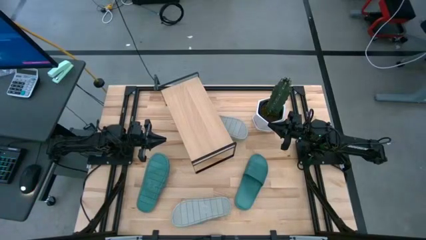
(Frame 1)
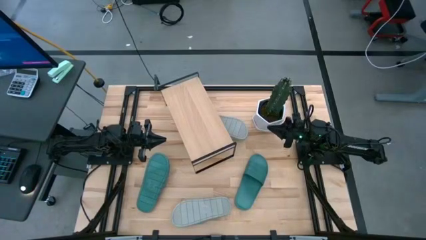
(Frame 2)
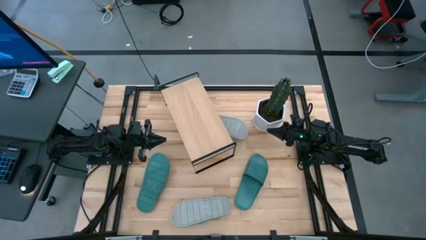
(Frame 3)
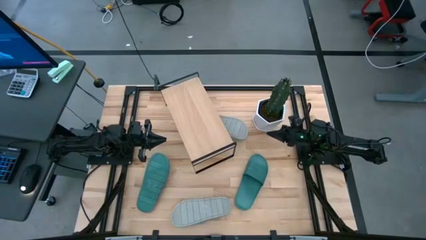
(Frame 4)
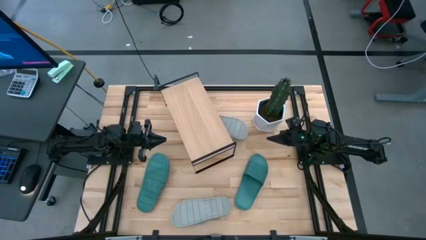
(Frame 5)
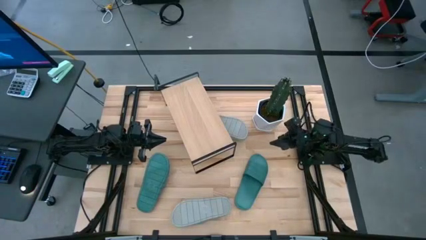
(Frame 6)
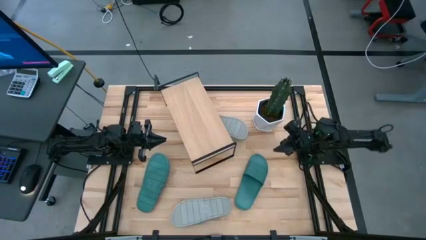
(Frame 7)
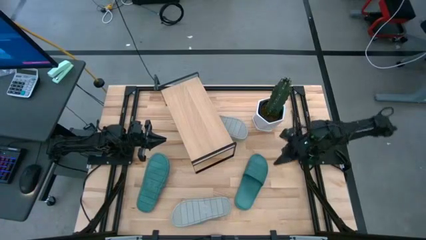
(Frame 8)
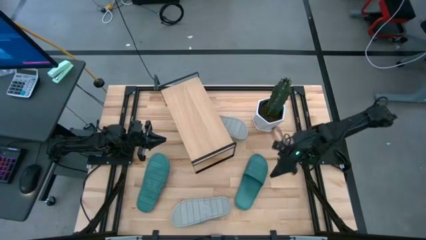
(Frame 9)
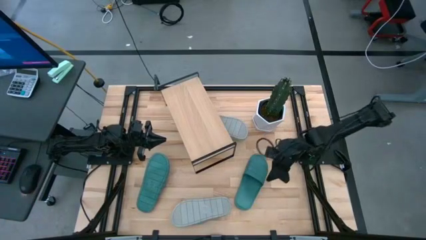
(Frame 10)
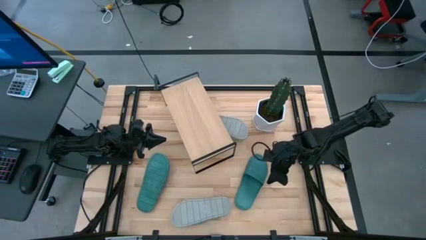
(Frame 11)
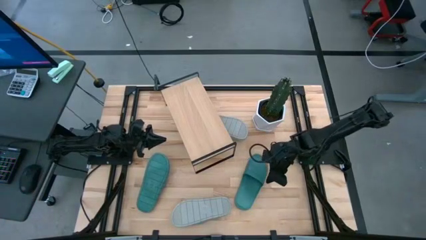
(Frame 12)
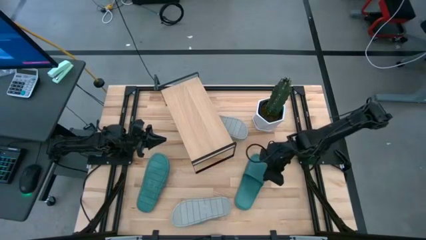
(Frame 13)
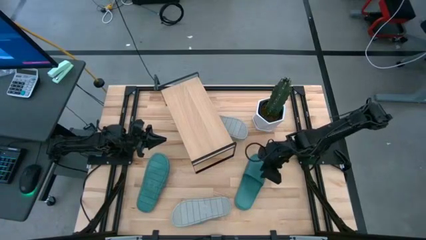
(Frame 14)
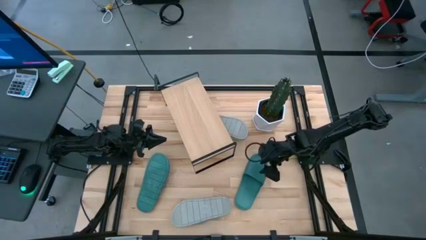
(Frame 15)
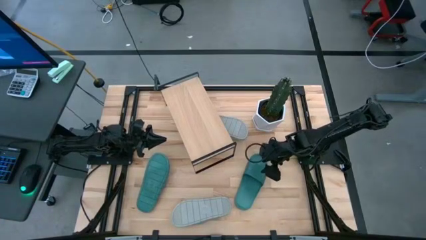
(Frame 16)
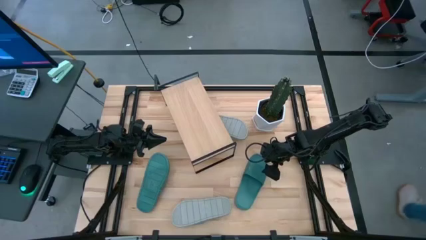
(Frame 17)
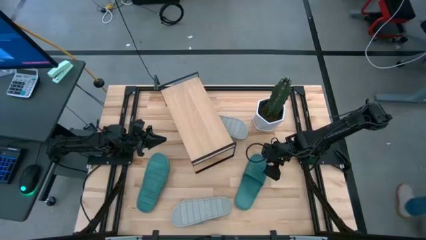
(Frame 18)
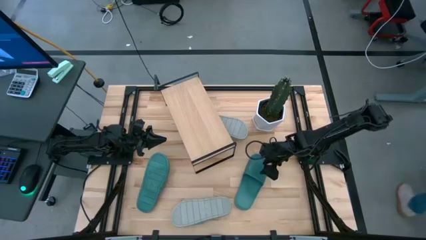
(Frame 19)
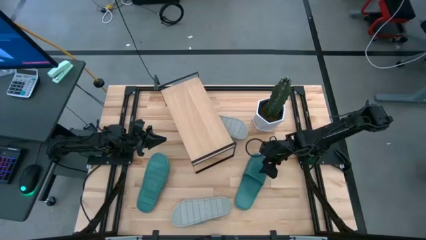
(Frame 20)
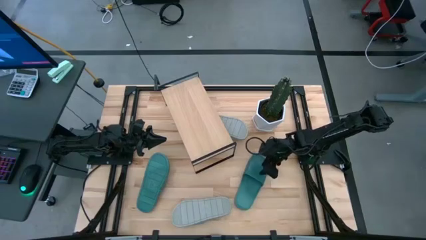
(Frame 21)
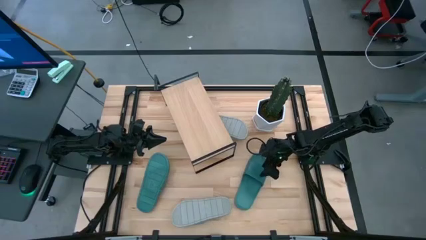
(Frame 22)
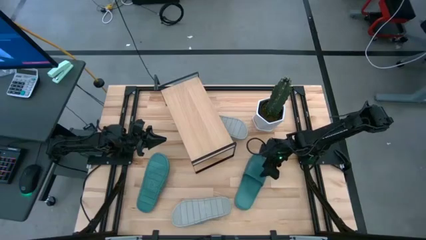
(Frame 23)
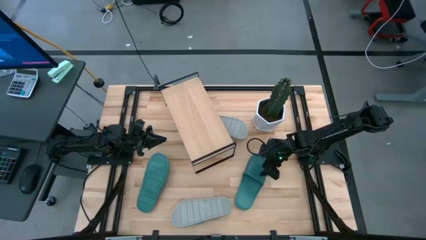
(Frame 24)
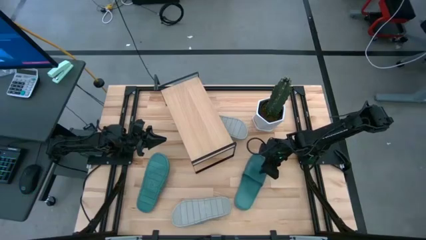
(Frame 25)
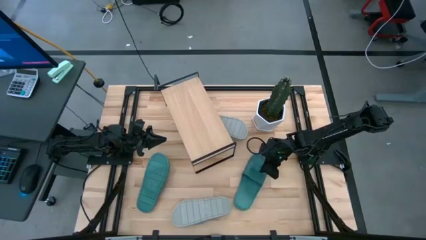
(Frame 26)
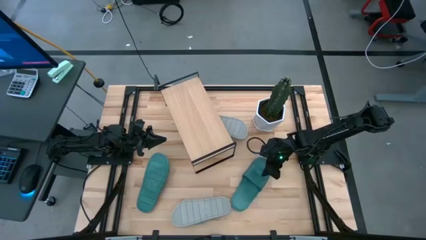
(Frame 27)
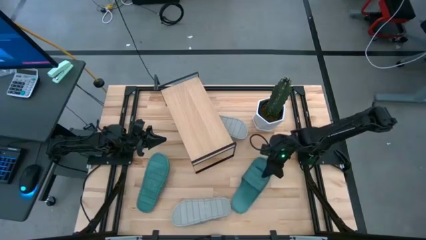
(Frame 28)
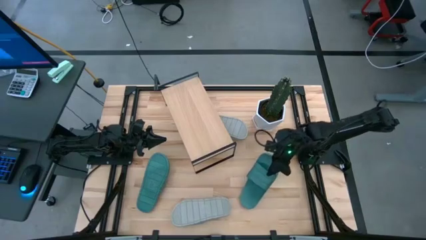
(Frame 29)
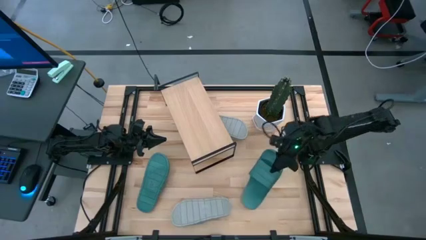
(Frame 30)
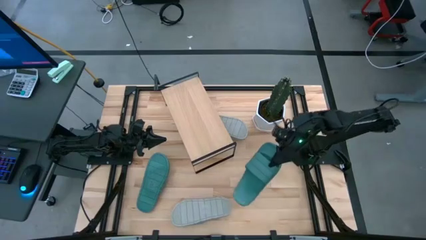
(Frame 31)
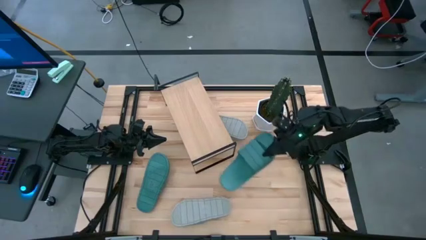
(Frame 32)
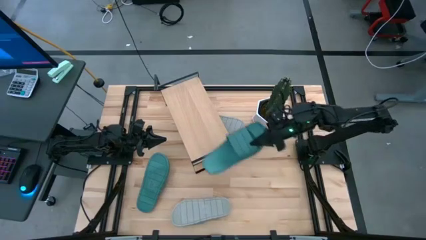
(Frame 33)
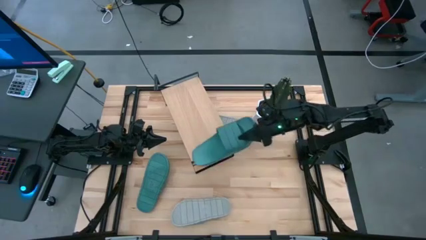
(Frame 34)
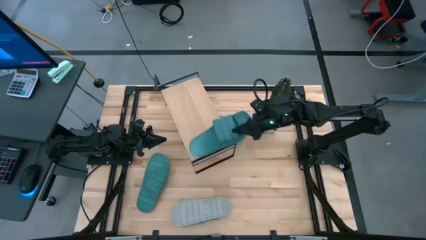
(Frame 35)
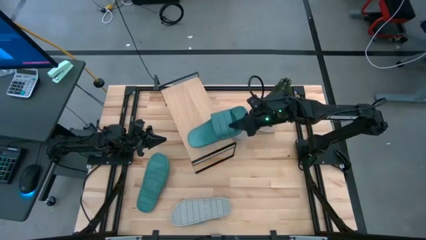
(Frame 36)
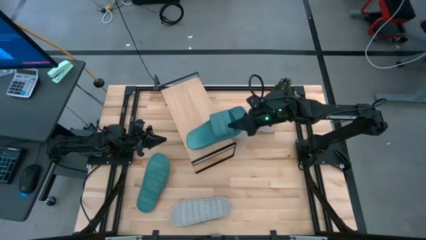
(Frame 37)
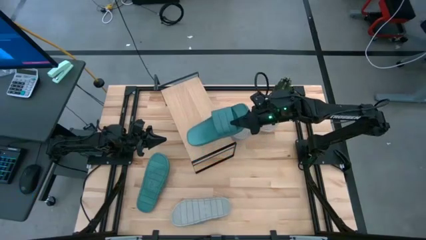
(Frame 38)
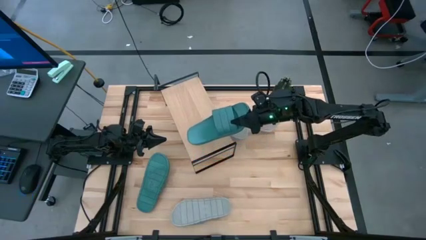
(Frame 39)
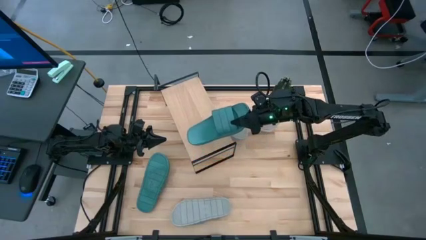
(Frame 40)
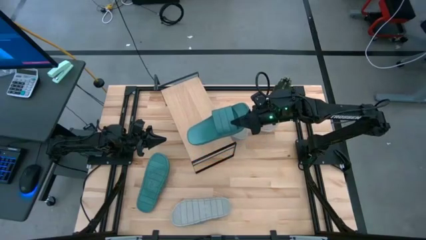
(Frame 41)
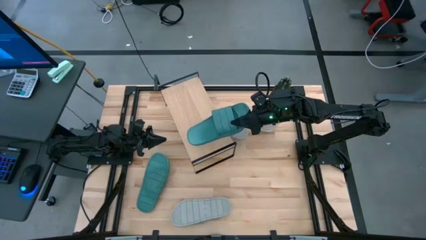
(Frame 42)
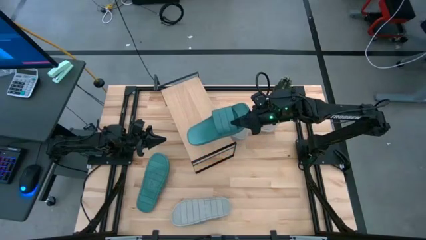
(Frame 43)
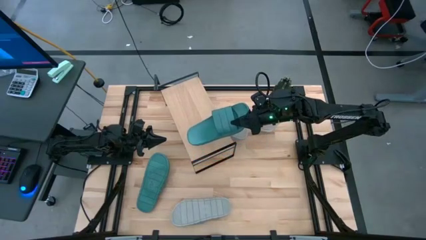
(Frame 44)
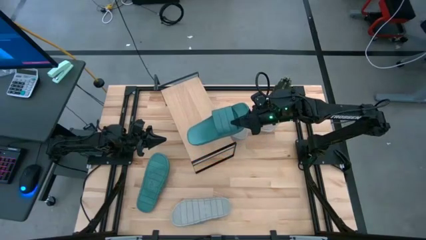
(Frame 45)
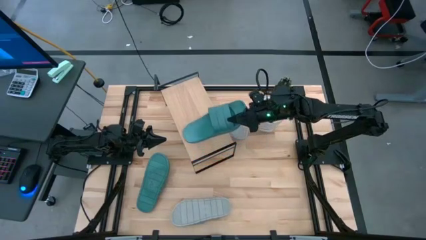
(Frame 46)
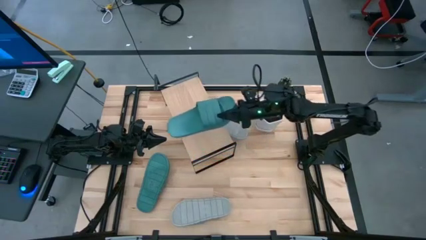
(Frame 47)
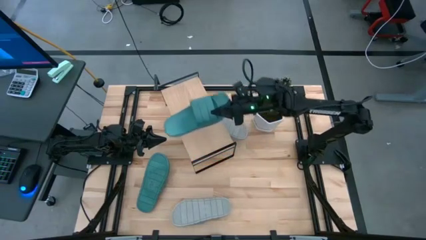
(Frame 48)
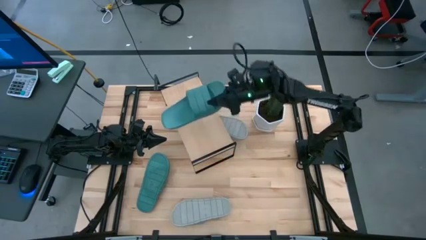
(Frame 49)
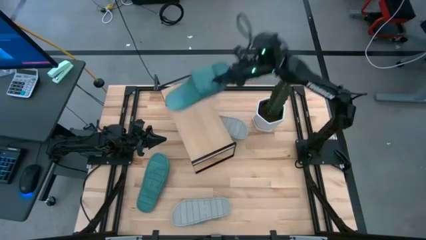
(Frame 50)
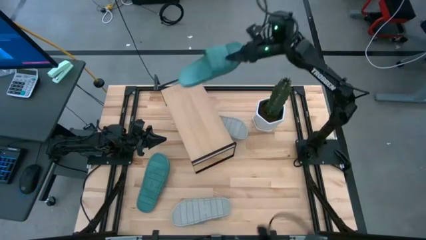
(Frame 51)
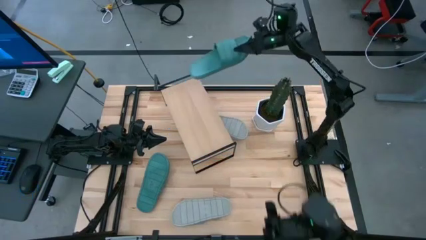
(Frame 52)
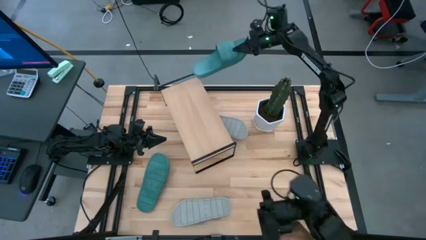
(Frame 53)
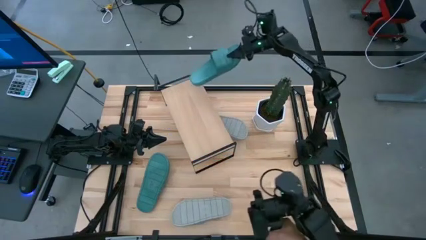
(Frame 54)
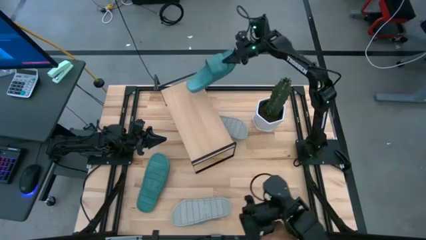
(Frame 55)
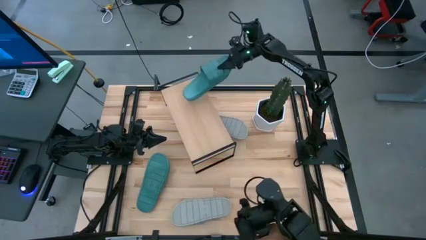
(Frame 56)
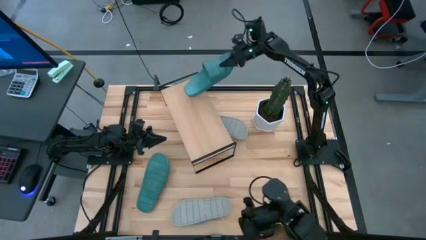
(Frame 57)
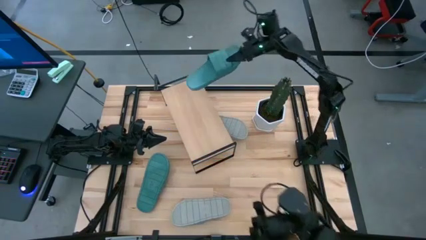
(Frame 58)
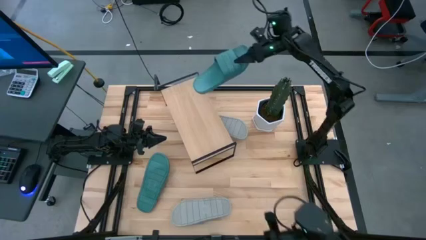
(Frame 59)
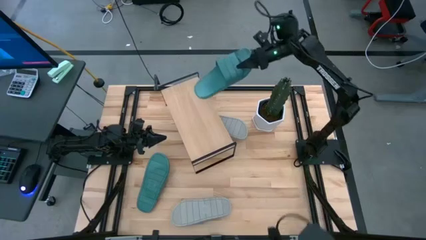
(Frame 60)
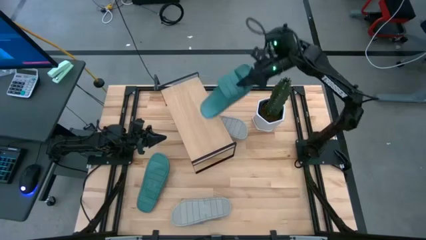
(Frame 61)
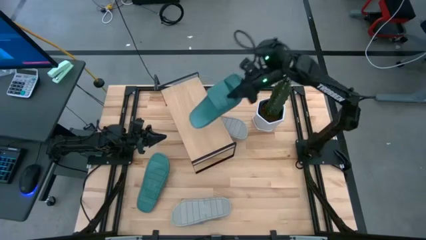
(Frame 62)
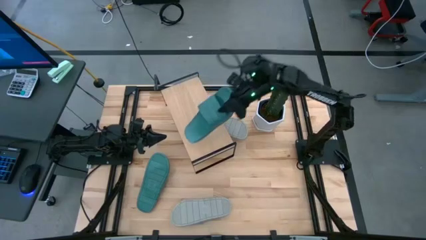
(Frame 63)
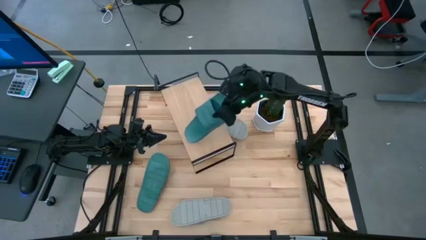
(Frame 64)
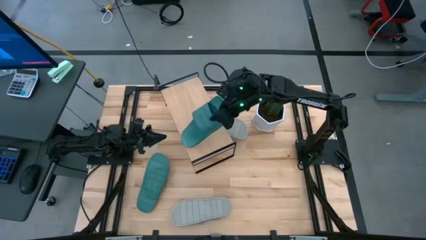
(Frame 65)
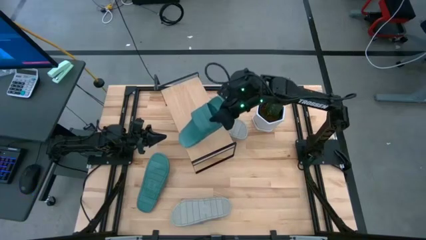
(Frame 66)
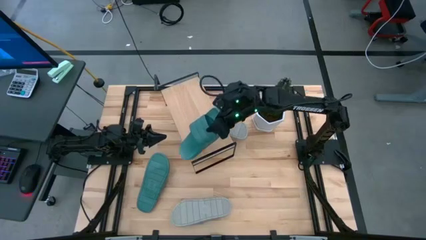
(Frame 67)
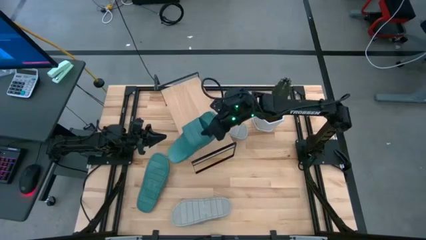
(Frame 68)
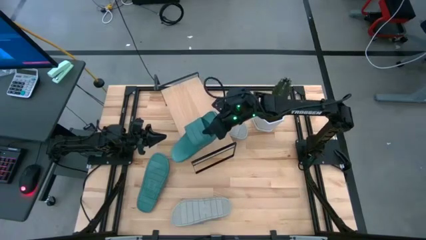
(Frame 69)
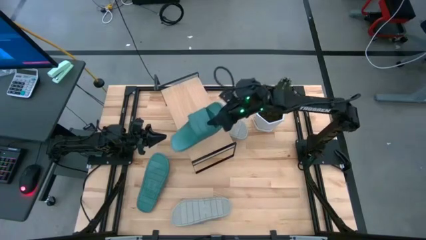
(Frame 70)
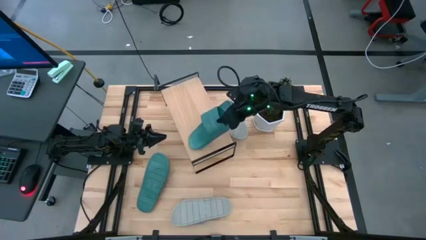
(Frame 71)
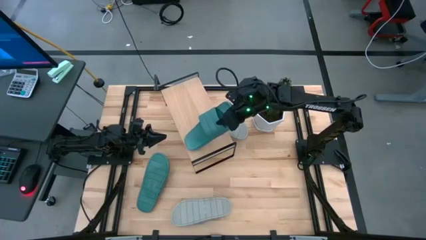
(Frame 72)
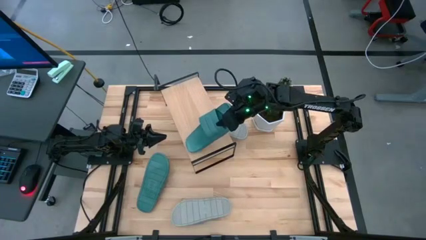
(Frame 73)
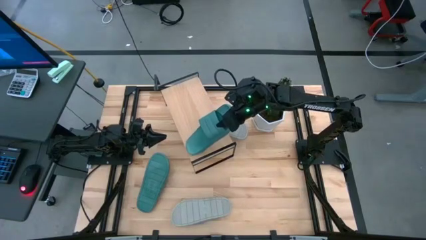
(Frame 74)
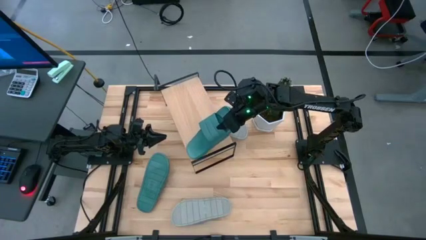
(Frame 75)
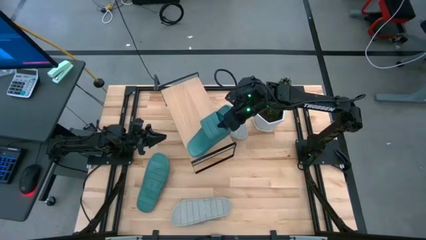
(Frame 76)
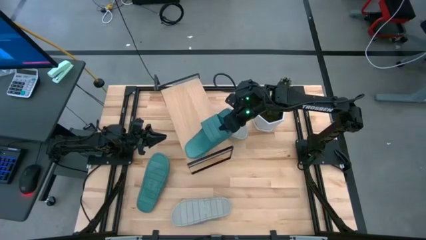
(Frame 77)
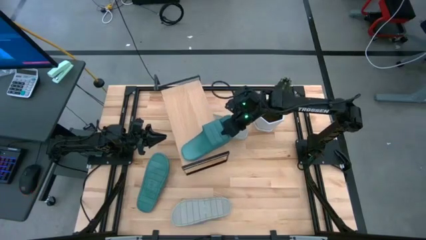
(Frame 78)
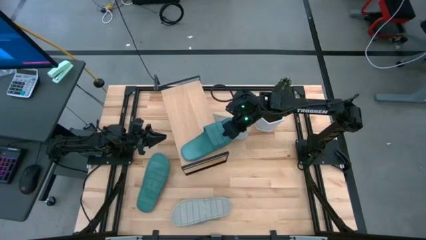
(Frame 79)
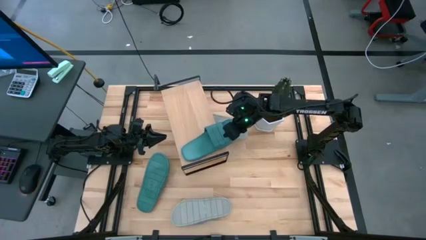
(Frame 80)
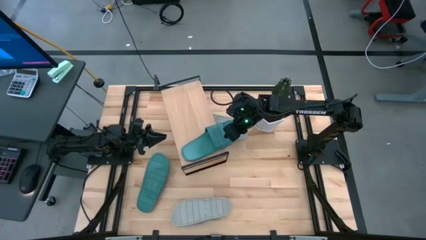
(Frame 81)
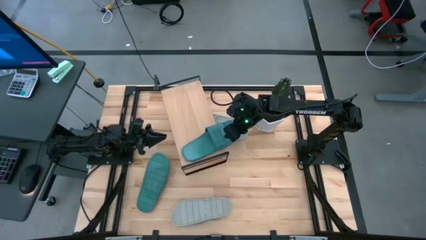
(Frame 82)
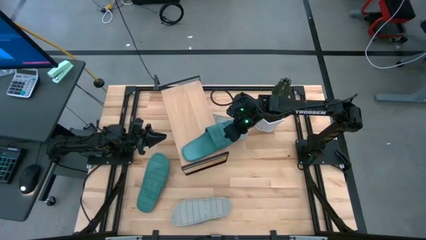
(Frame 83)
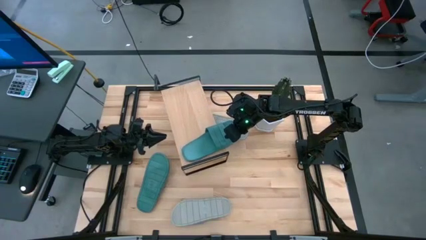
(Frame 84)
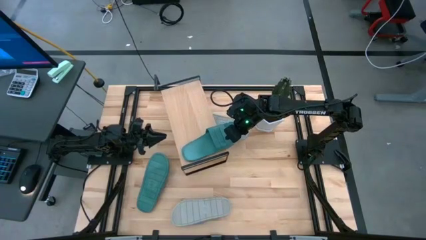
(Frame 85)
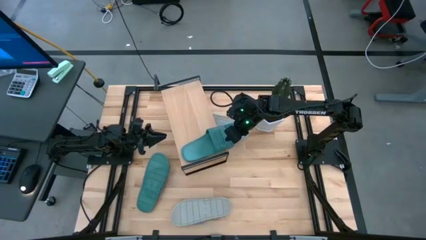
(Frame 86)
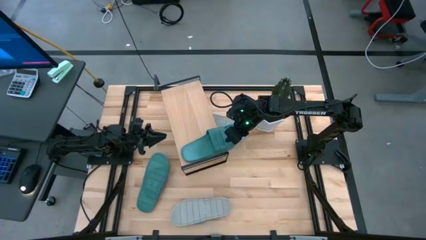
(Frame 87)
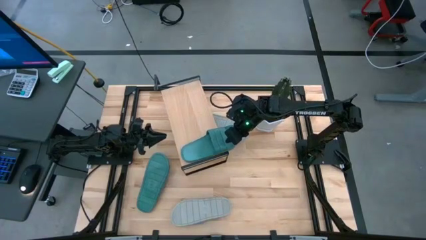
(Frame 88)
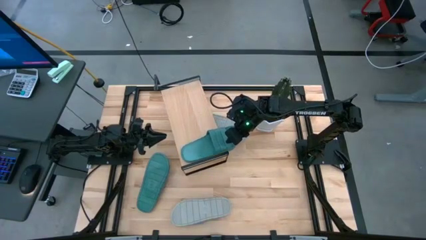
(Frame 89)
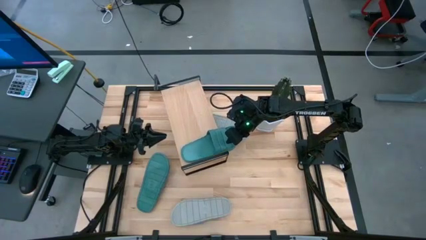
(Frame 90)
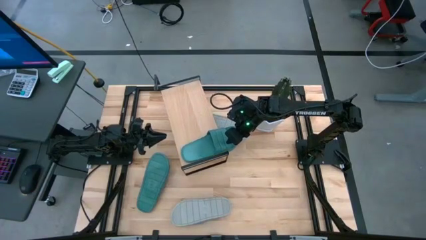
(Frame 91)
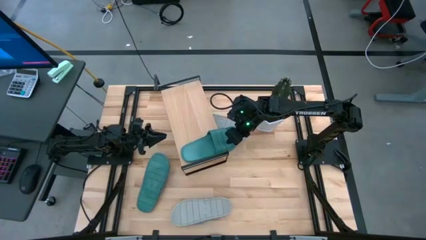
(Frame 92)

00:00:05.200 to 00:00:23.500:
Task: Pick and place slides into the shelf
Put the right green slipper on the shelf
